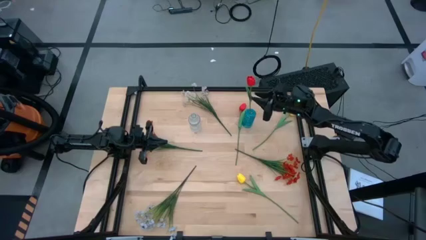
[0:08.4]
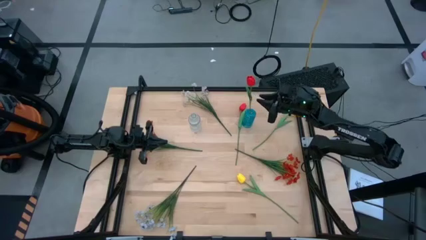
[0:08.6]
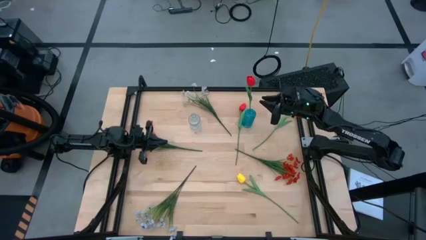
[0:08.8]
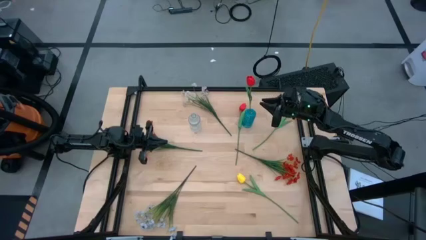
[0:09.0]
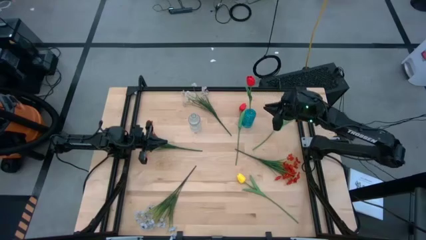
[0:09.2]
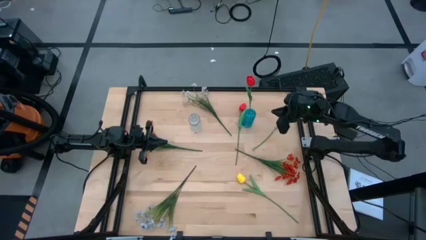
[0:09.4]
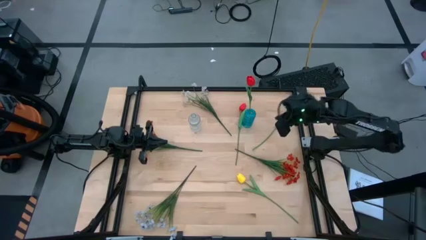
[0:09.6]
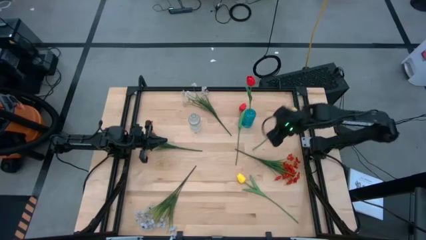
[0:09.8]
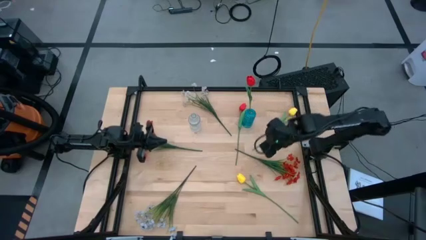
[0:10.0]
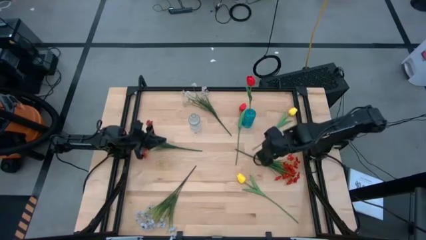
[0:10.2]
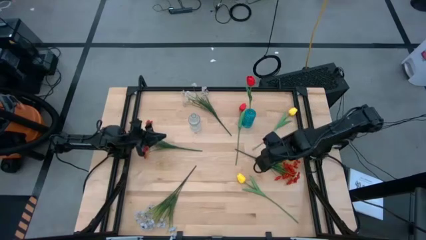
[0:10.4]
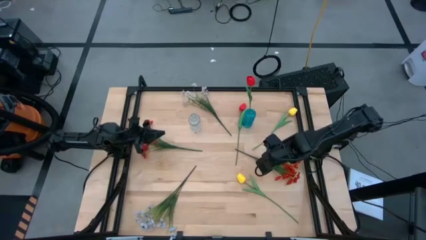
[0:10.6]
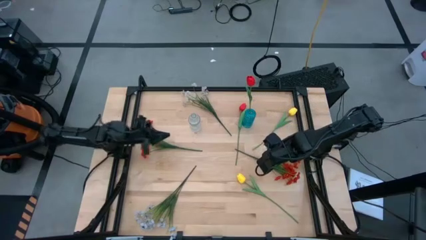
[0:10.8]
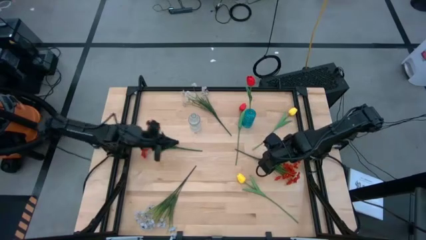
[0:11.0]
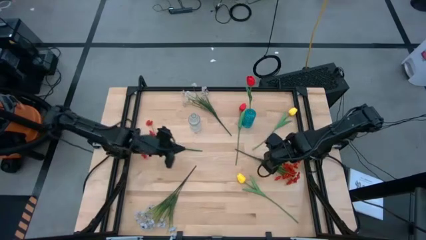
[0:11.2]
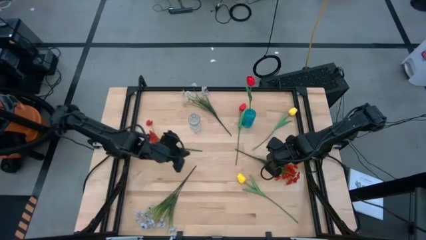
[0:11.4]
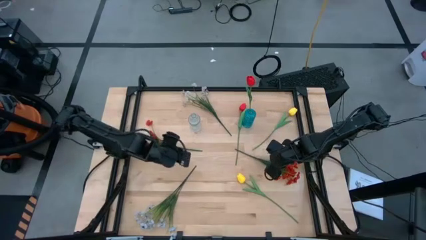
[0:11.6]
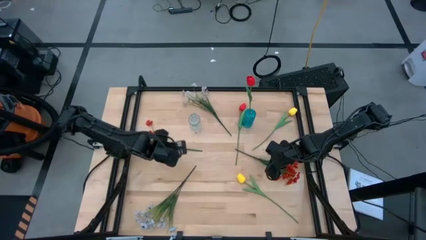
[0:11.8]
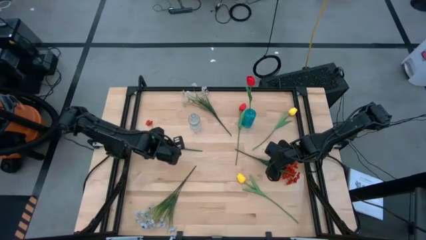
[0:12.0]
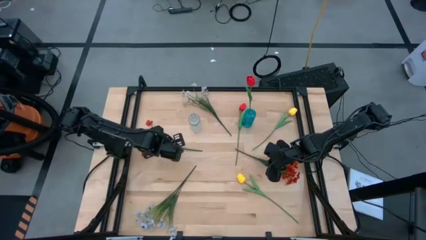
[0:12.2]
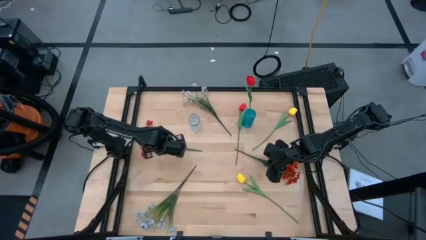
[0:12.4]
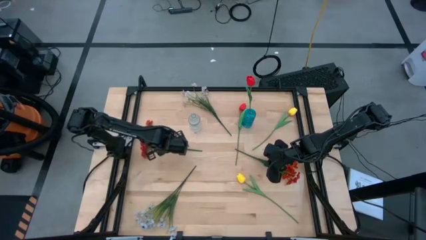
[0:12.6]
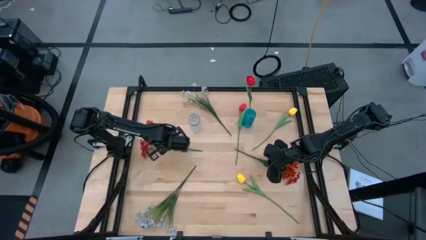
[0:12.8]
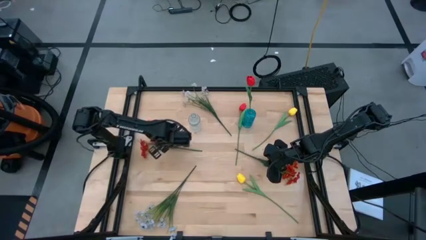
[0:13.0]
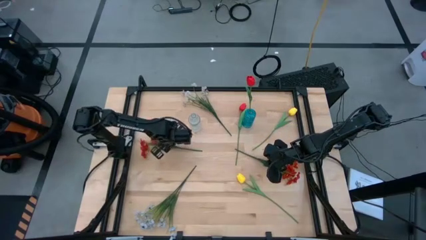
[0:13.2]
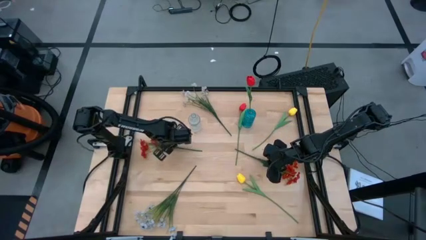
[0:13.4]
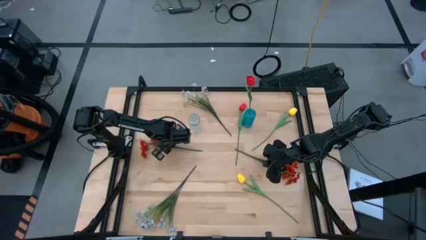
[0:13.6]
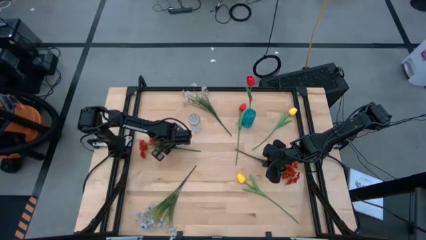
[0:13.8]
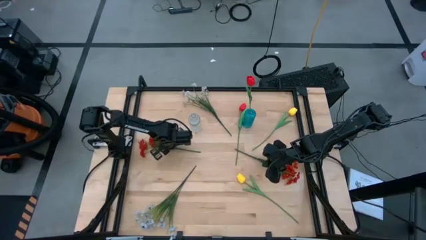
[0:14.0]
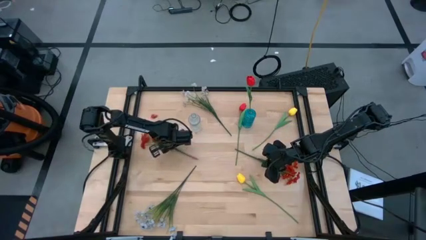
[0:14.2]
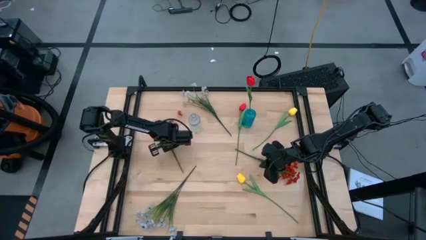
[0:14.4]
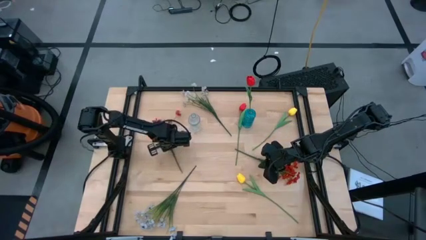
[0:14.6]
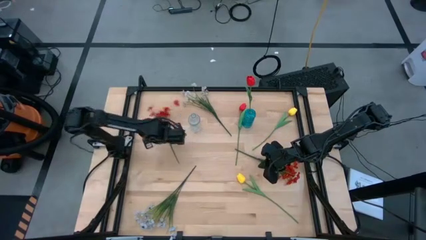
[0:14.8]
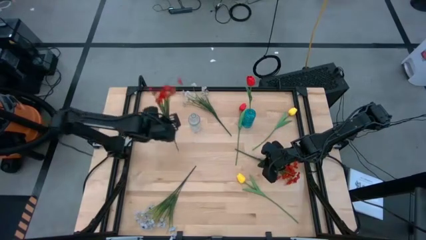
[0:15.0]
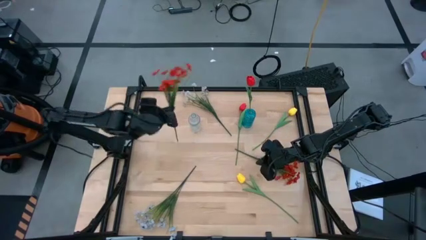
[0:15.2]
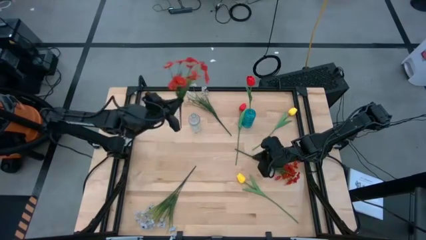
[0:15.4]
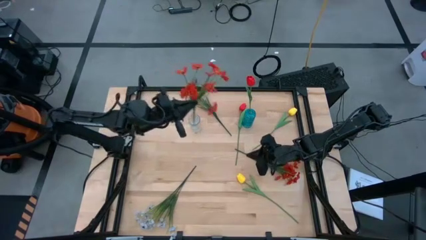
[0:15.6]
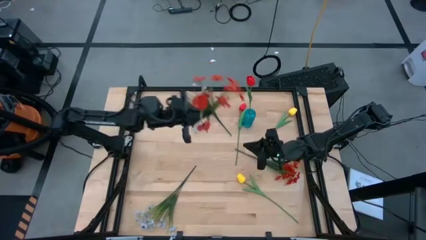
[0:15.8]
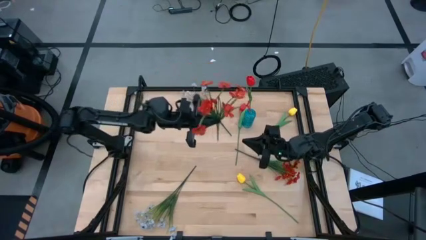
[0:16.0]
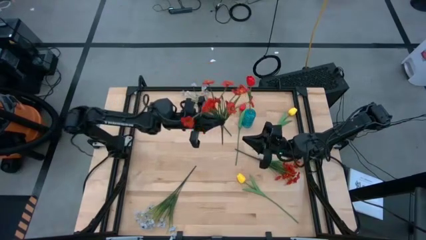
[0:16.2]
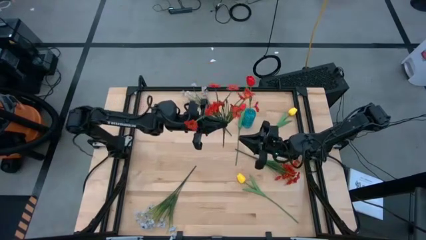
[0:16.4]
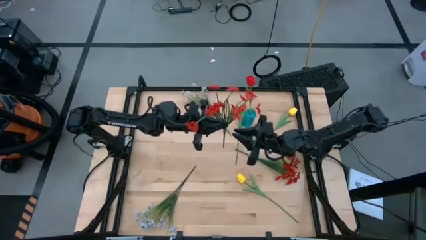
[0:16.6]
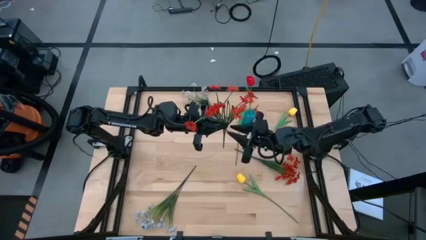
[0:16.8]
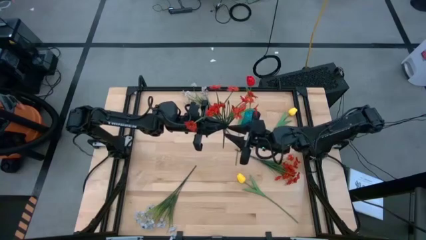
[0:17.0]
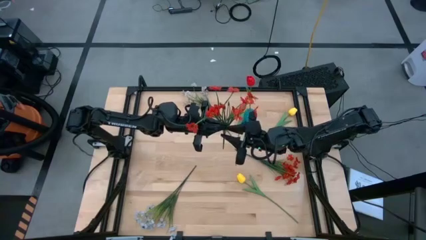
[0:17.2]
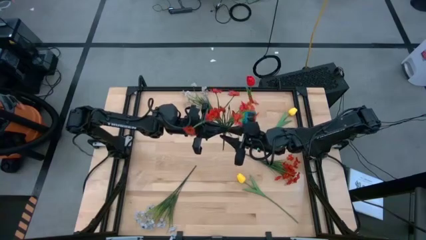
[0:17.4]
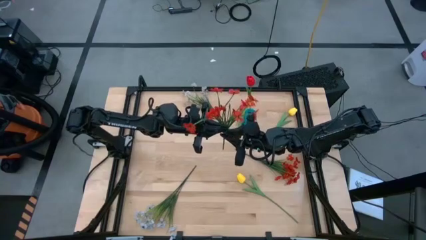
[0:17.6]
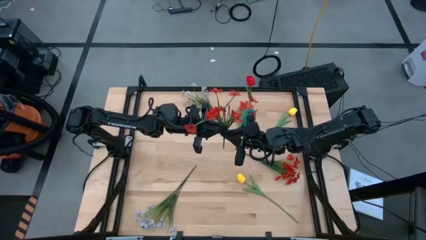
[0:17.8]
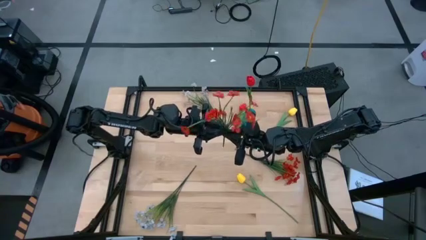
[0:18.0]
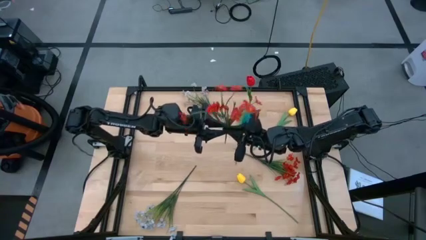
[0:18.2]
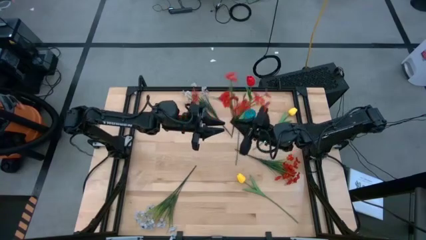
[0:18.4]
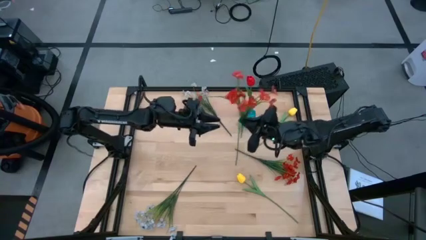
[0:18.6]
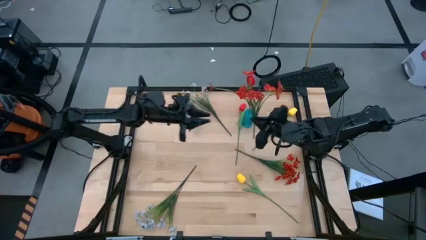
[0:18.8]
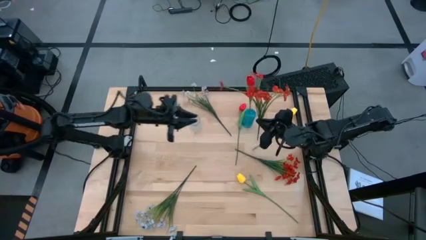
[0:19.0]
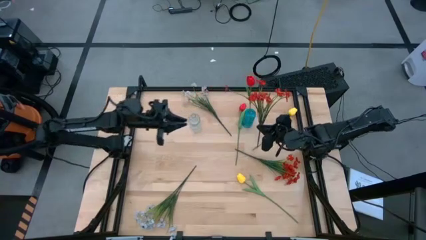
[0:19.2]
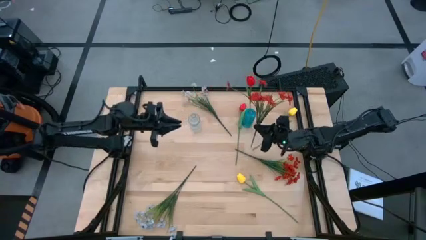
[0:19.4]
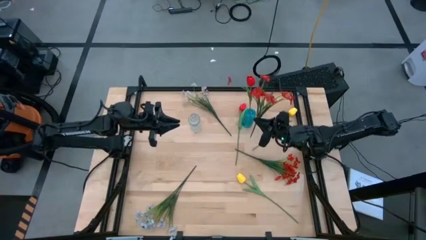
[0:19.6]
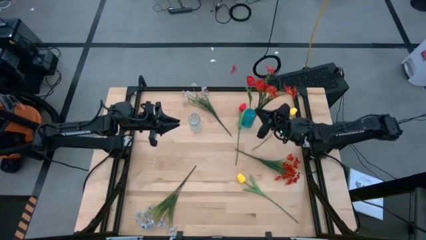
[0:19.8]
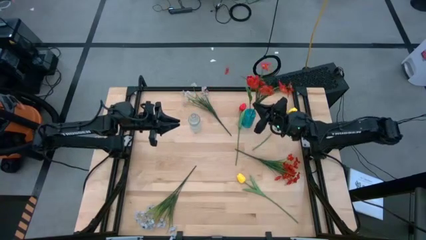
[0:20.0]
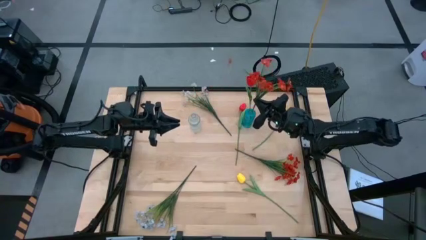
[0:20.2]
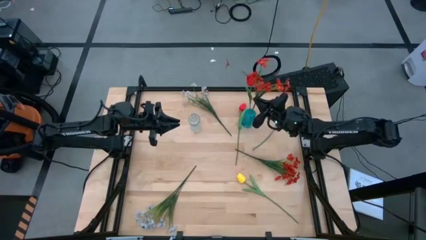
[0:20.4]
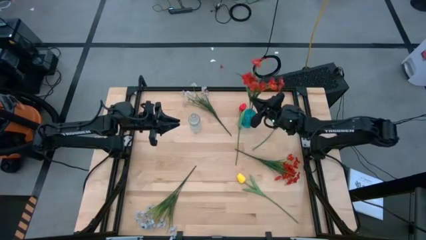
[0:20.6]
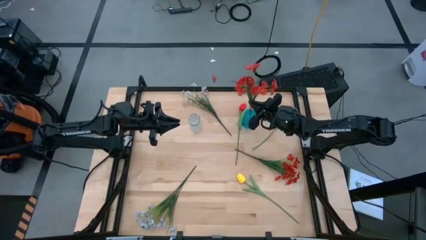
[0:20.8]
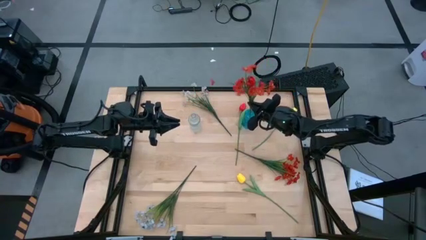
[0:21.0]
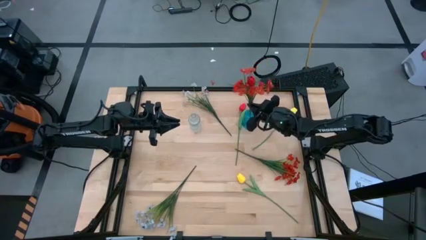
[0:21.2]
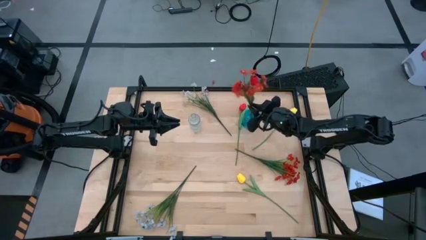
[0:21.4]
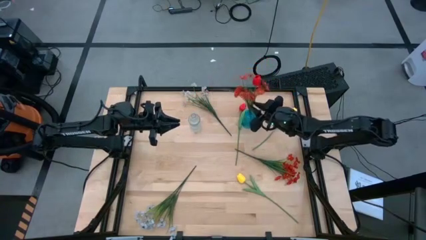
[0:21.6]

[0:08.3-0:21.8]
Task: Sort flowers into vase by color
Put the left red flowers into the blue crystal vase
